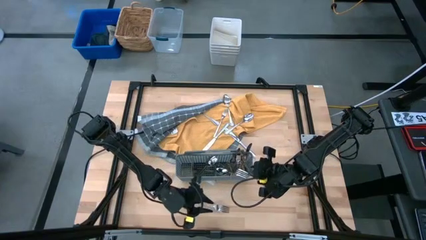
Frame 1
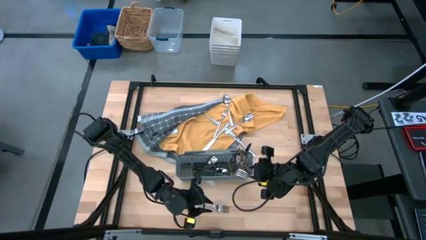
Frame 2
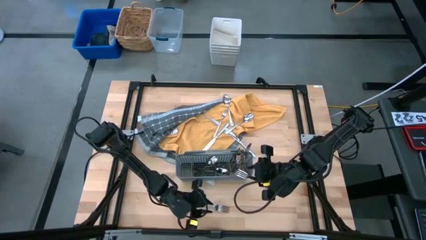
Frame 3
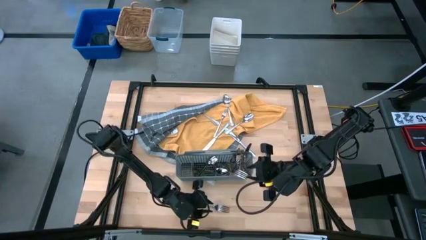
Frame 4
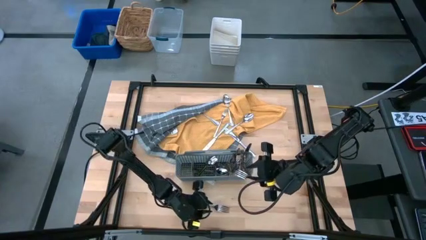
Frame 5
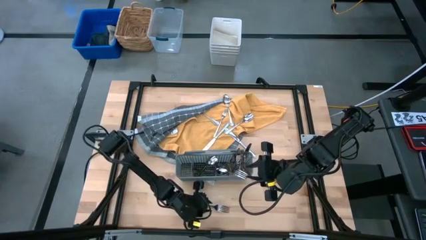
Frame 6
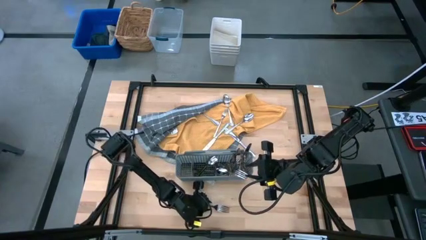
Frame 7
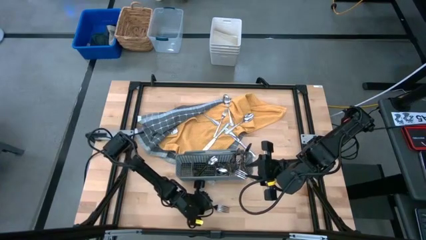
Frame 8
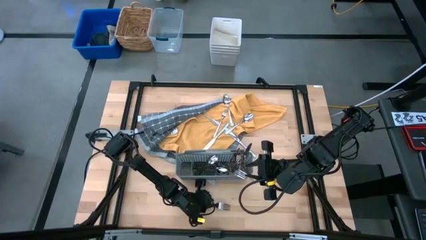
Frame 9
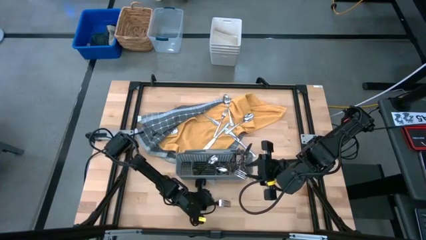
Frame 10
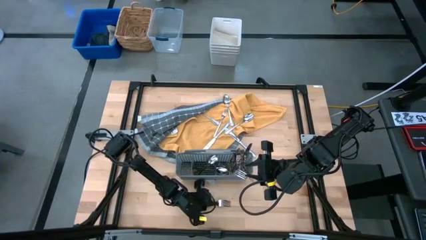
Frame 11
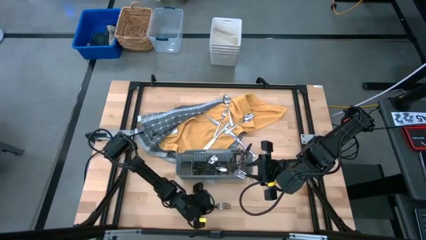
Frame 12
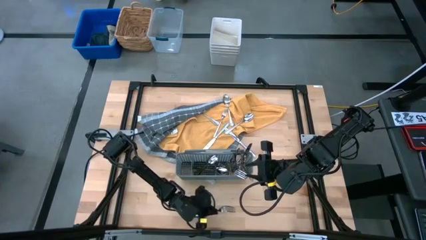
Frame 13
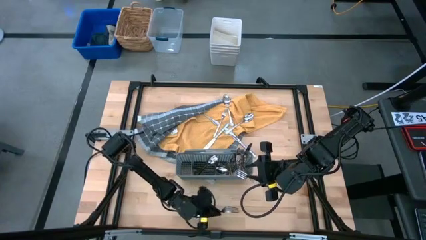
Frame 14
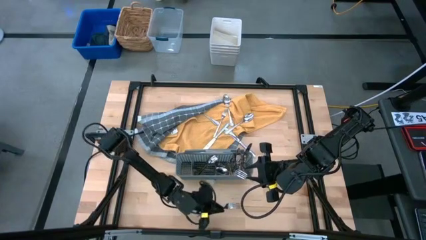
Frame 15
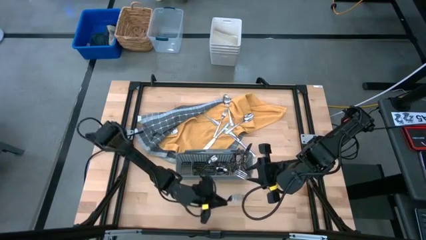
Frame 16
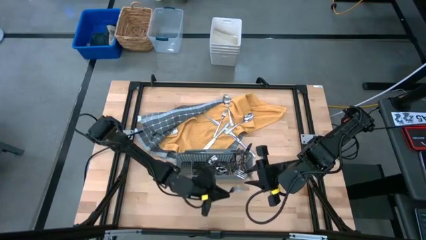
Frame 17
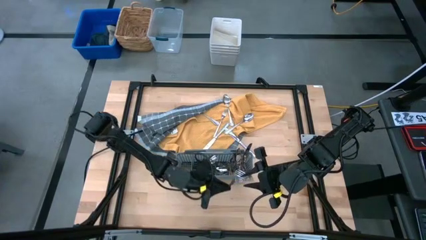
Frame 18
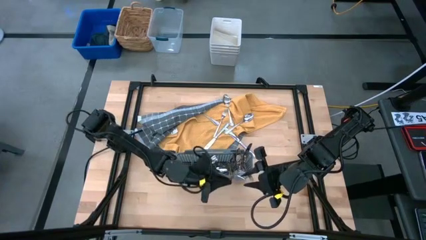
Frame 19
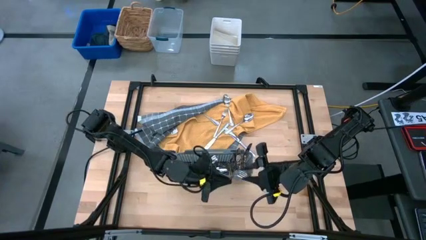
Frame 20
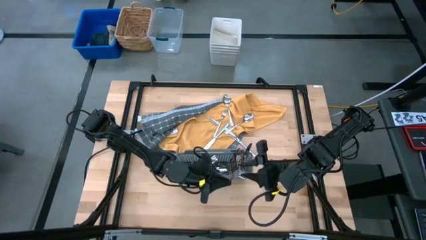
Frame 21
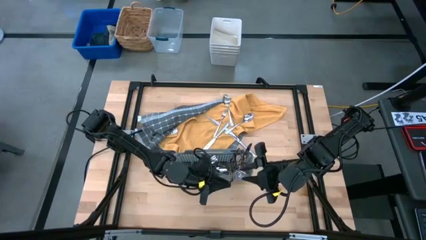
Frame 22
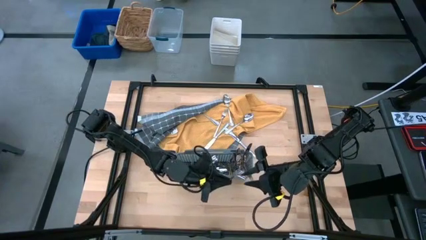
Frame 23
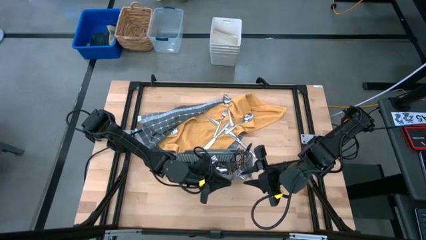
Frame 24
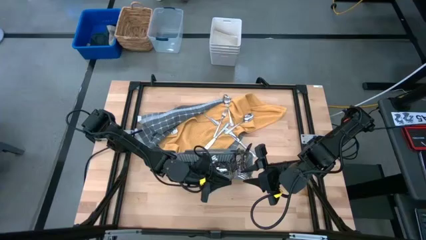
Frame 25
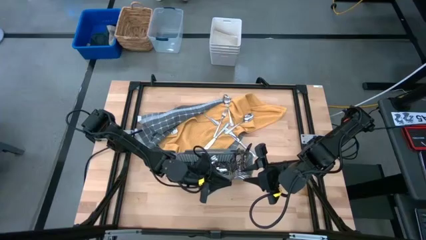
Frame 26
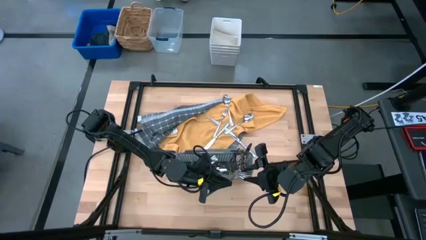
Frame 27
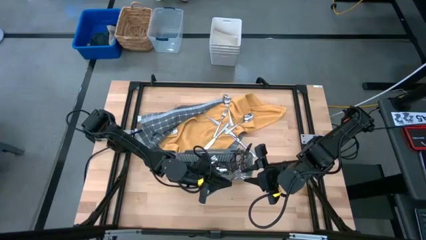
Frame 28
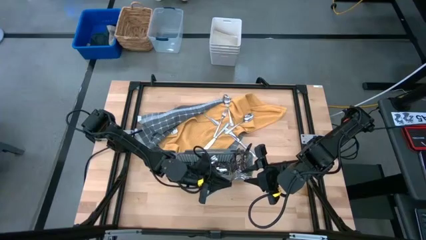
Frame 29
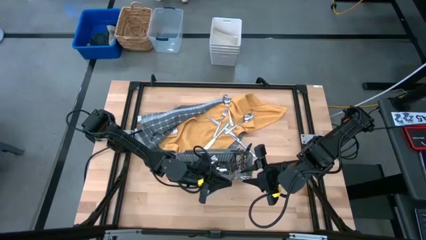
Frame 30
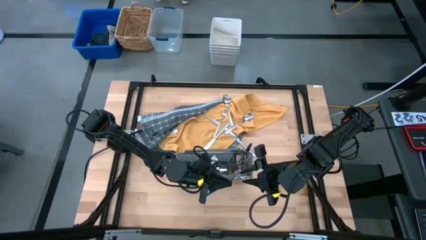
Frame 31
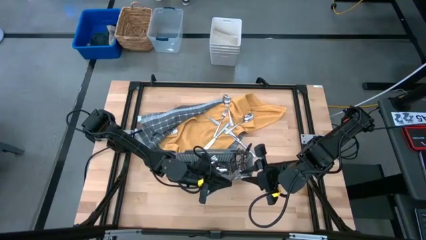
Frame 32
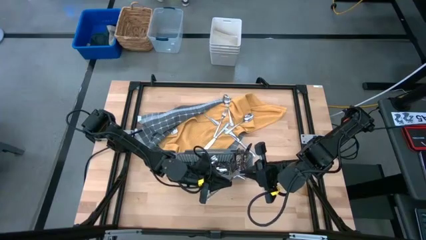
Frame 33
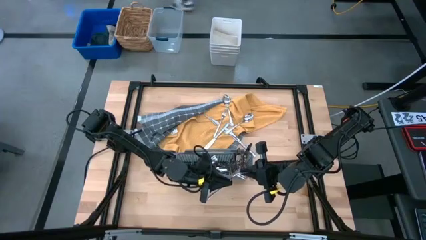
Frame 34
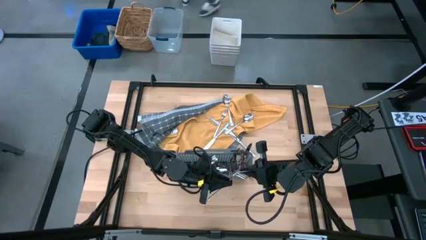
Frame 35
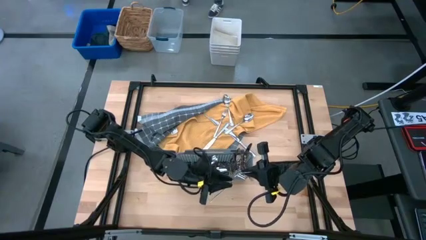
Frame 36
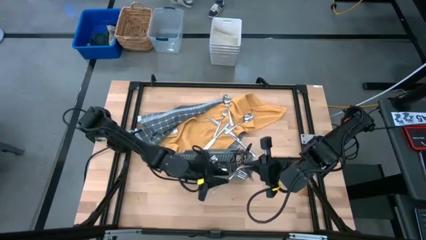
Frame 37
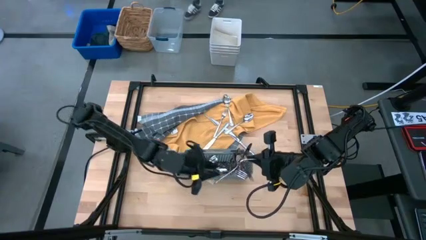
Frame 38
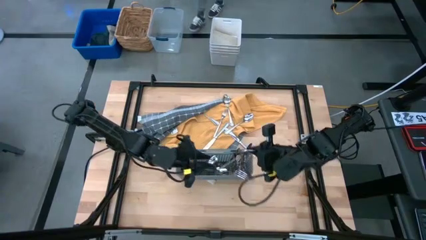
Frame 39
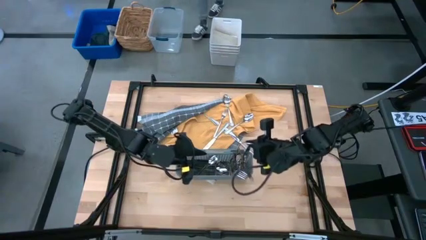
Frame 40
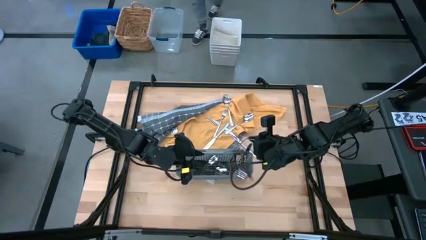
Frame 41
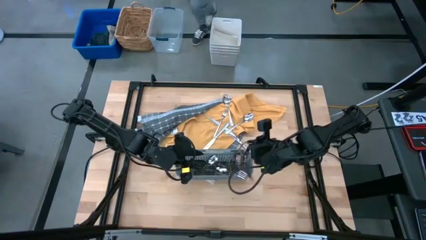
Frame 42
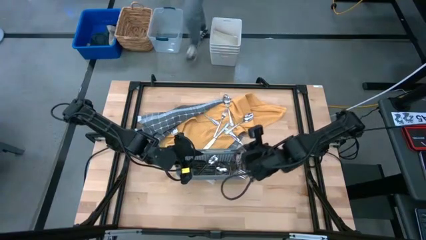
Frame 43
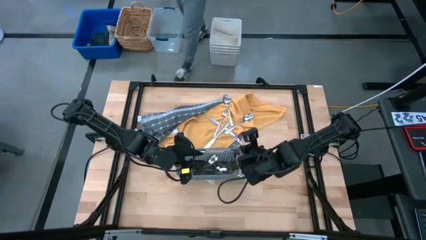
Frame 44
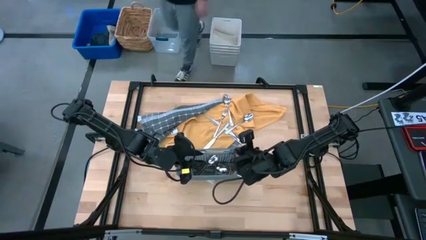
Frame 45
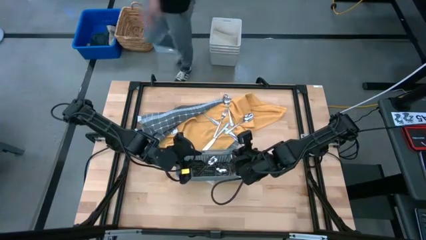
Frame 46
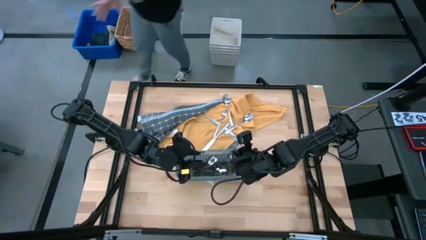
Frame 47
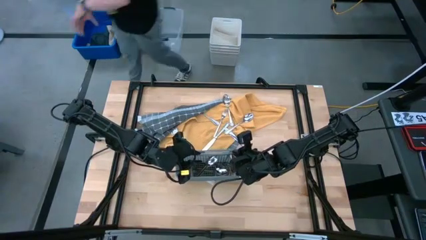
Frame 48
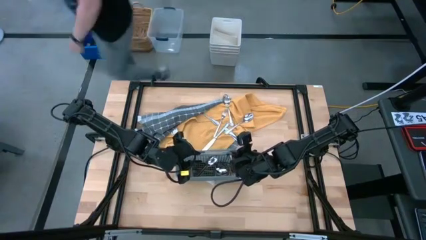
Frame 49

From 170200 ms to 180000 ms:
Task: Sort silverware
Put the silver fork into the gray silverware basket

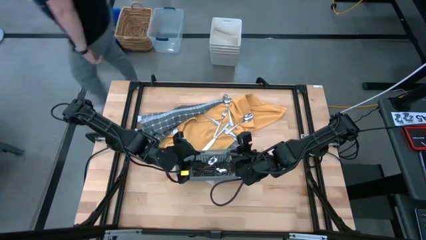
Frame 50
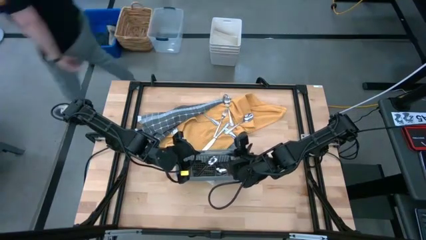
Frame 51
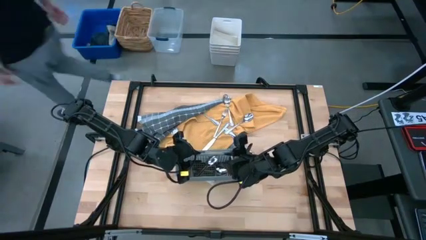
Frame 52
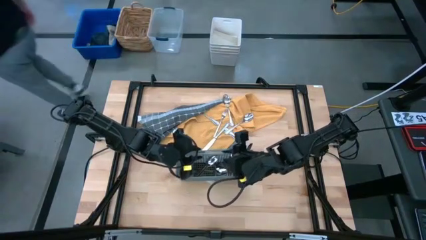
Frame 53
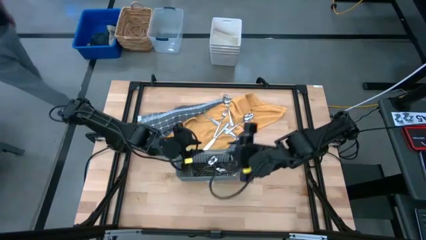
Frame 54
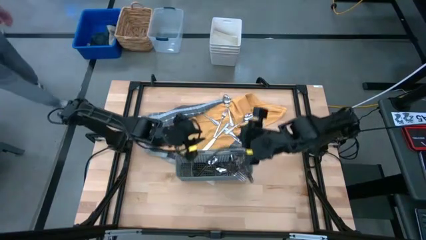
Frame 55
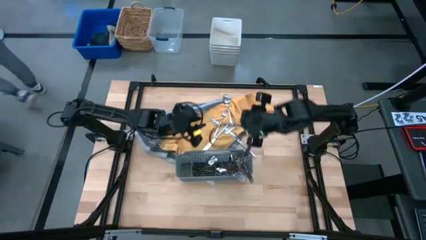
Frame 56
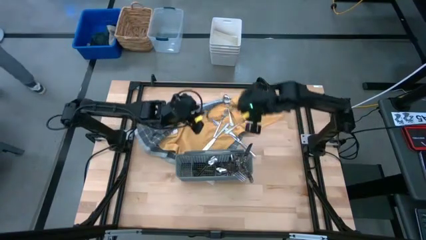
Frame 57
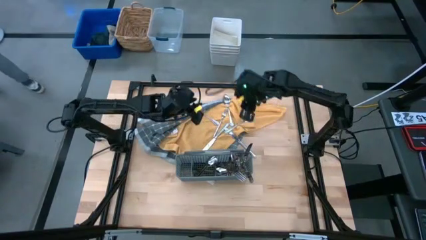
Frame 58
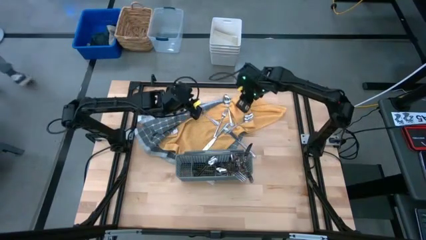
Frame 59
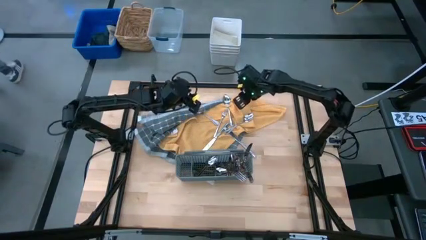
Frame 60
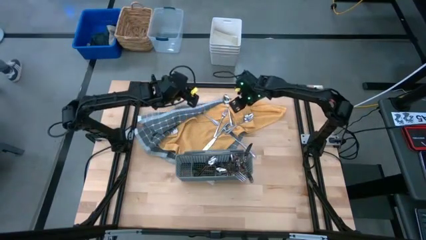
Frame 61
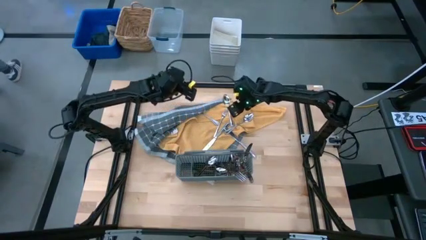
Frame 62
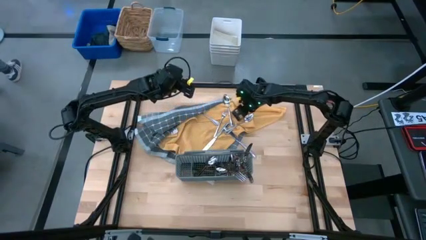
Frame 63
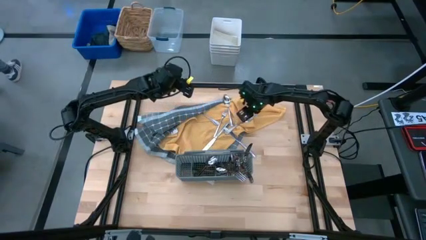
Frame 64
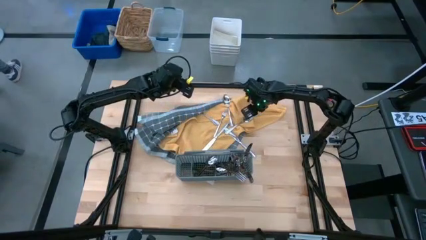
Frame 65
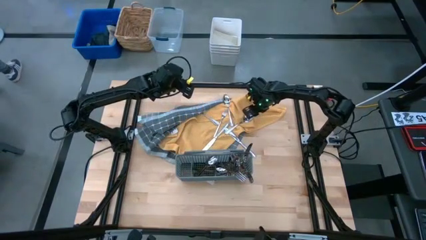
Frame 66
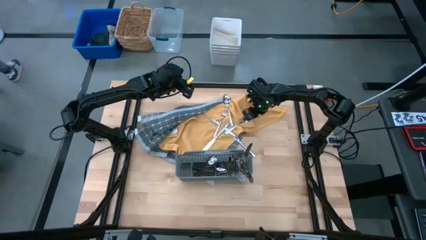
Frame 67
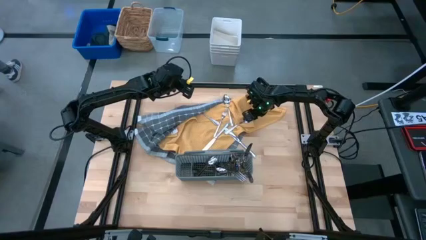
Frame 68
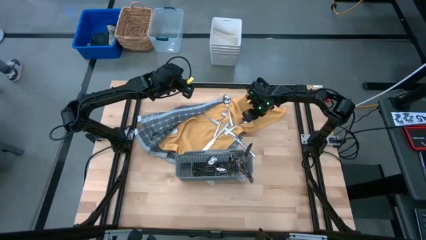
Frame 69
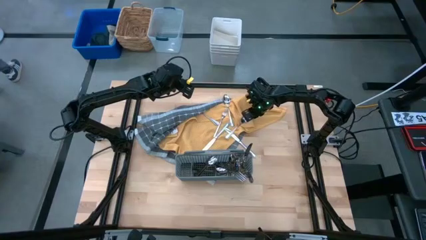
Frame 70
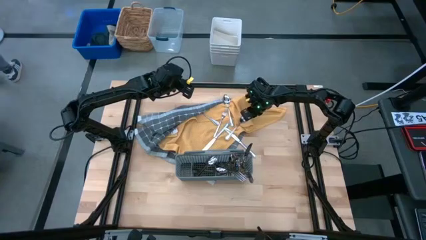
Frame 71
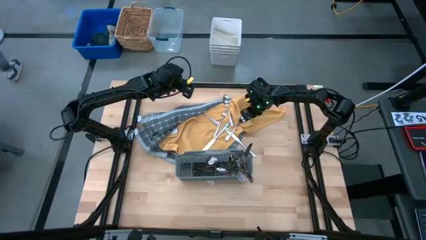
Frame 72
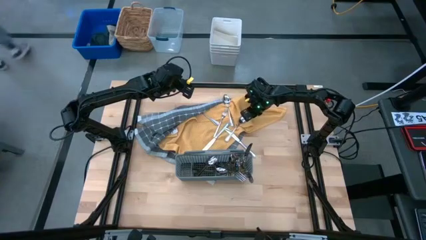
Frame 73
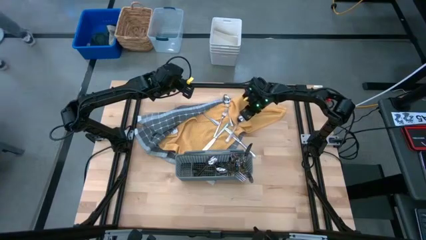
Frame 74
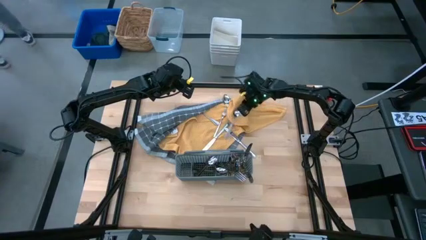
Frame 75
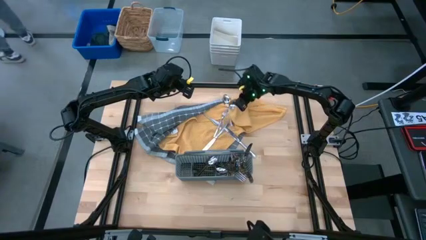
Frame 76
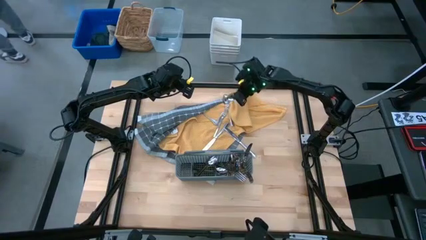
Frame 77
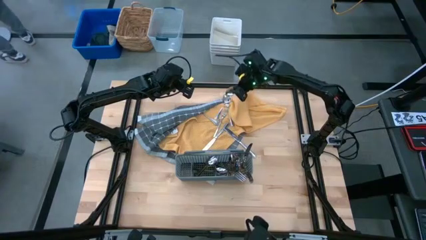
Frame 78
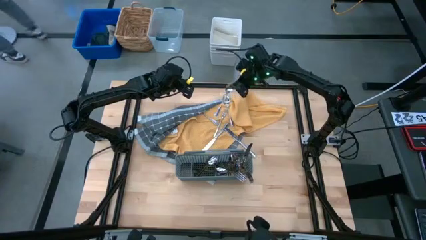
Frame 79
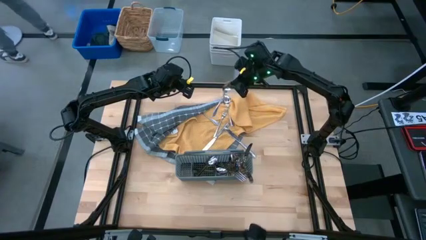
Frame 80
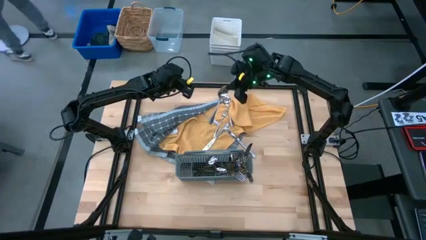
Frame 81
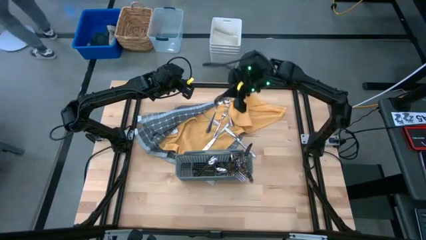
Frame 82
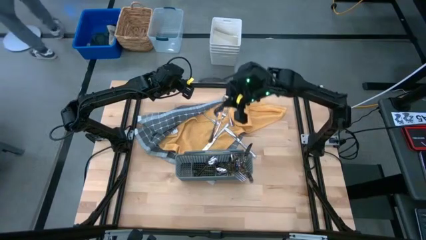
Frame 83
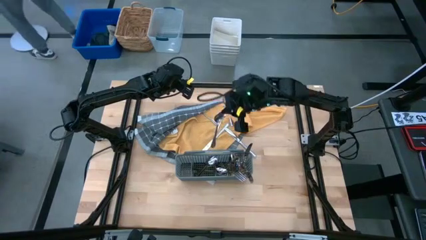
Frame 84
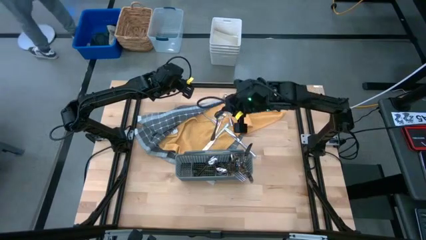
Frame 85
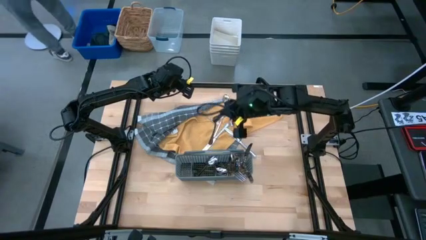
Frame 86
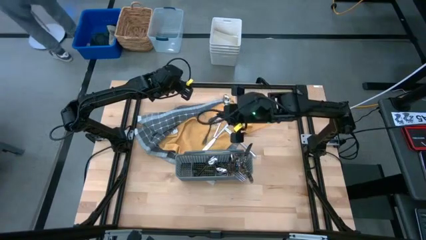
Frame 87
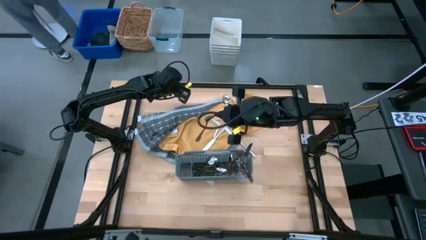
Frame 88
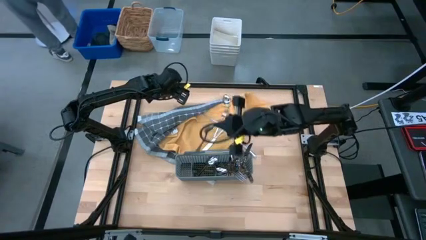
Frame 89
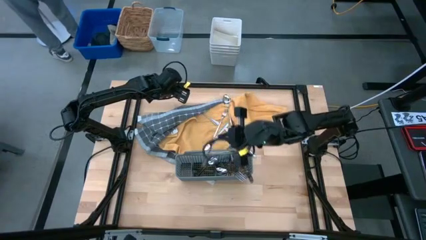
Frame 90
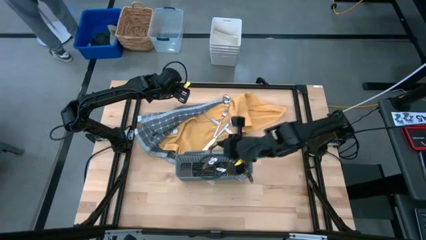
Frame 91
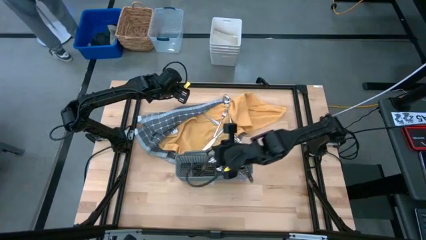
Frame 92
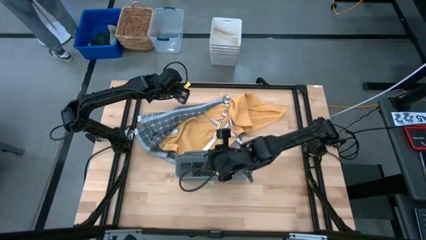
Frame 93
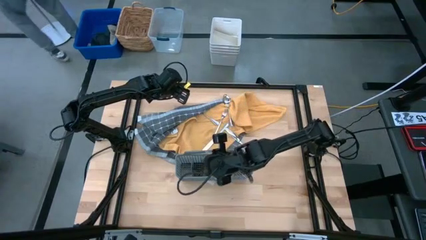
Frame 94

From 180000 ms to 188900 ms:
Put the silver spoon into the gray silverware basket
